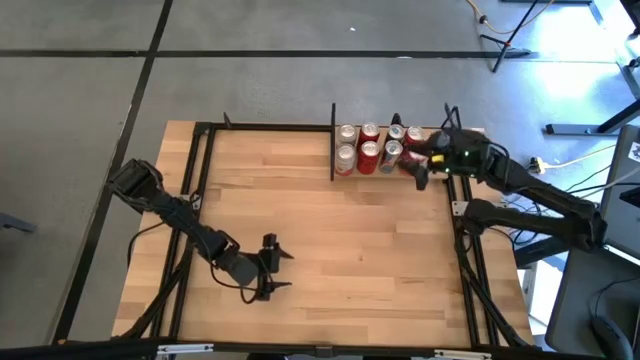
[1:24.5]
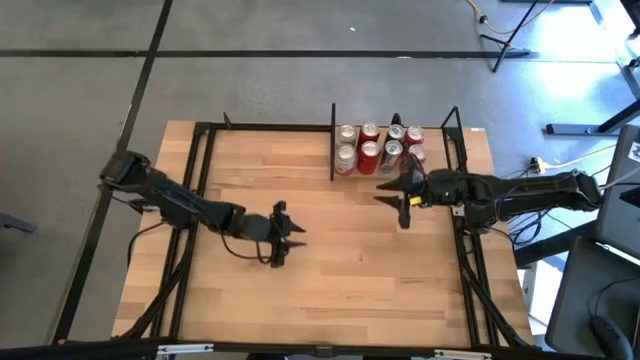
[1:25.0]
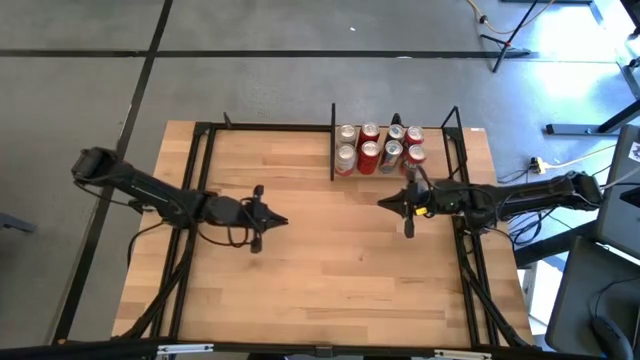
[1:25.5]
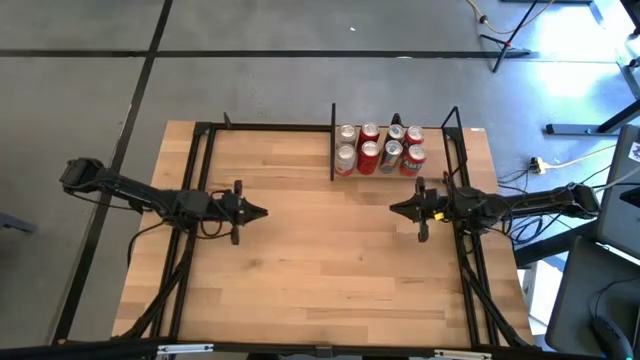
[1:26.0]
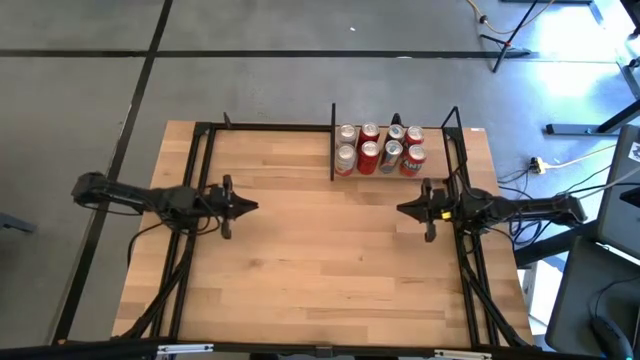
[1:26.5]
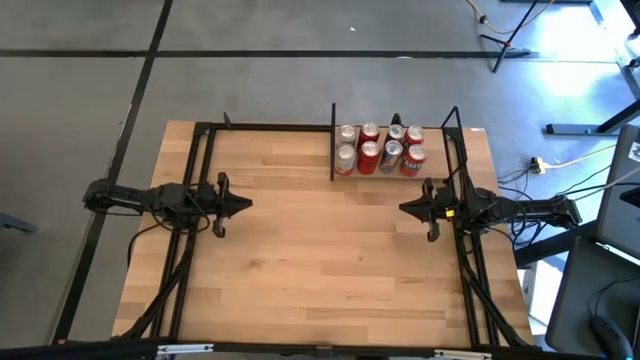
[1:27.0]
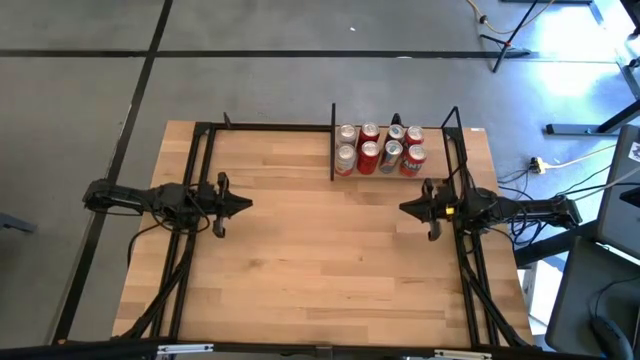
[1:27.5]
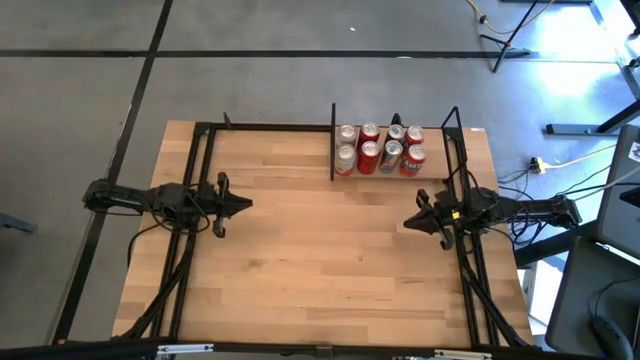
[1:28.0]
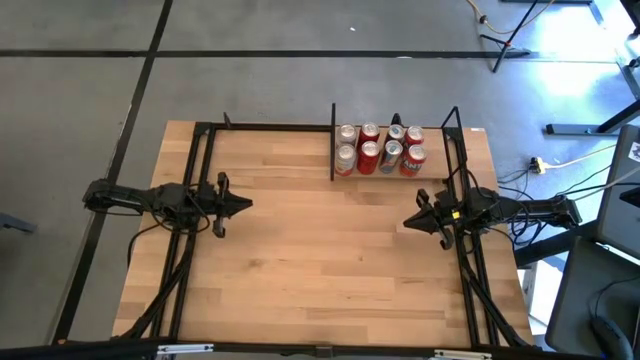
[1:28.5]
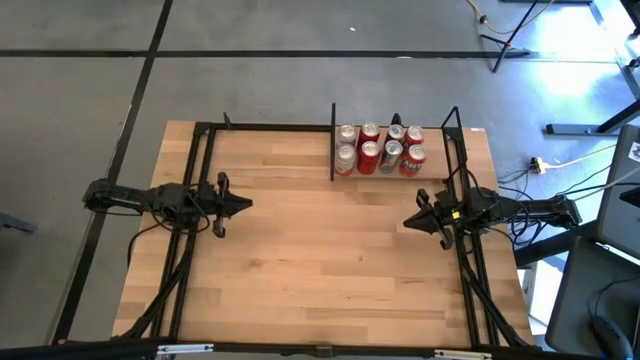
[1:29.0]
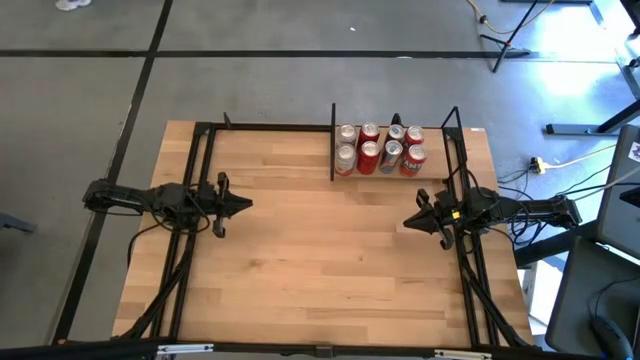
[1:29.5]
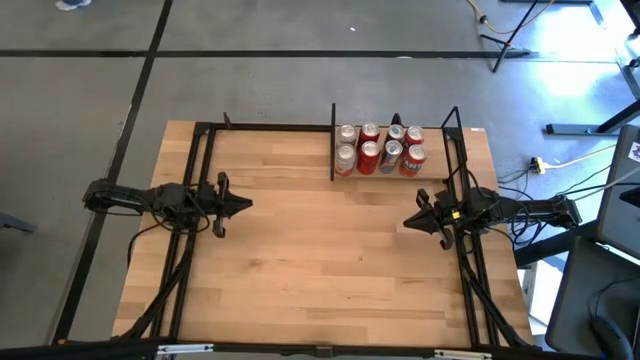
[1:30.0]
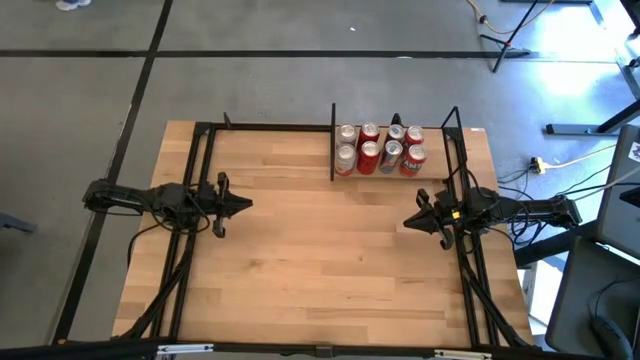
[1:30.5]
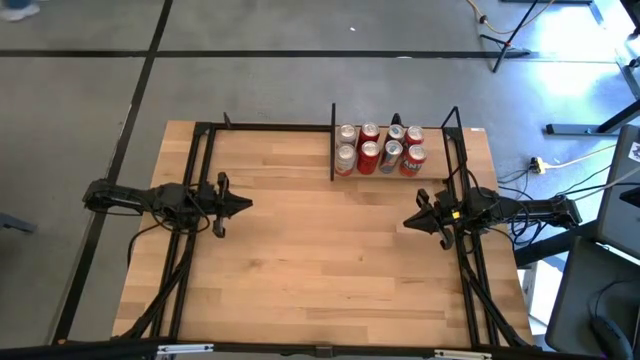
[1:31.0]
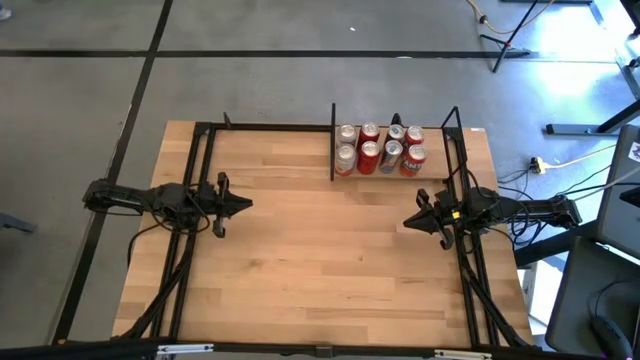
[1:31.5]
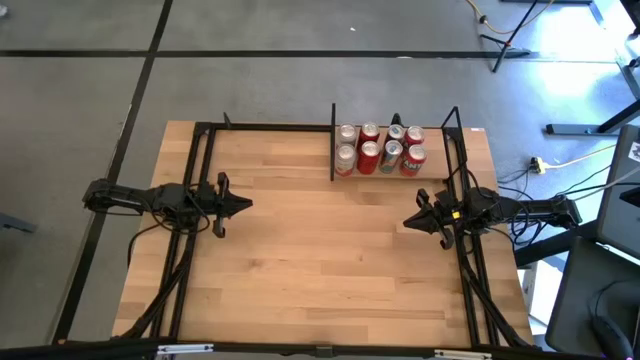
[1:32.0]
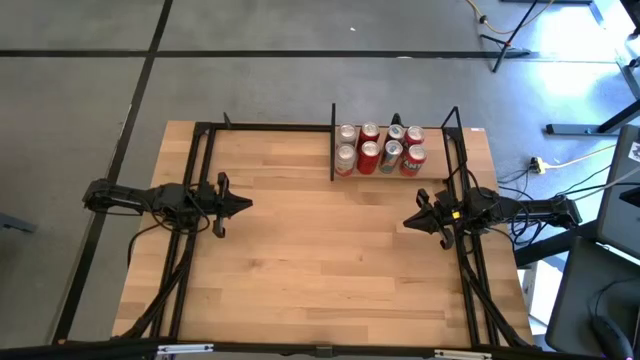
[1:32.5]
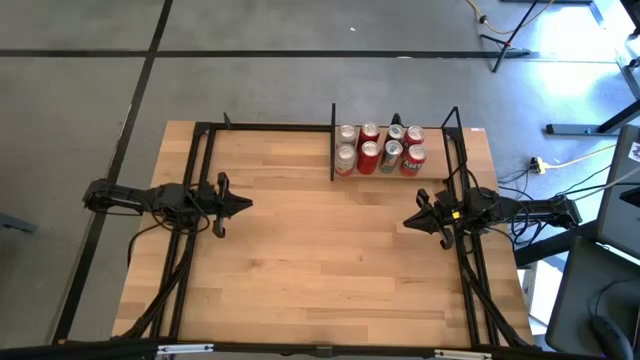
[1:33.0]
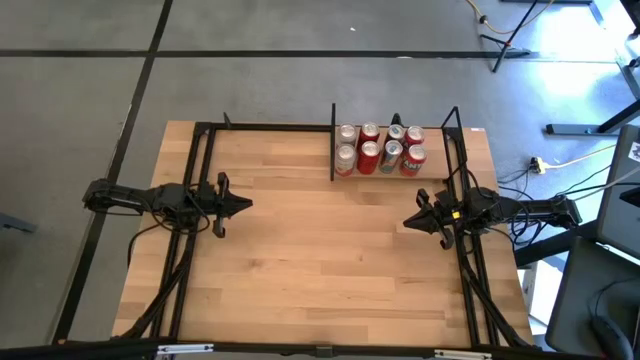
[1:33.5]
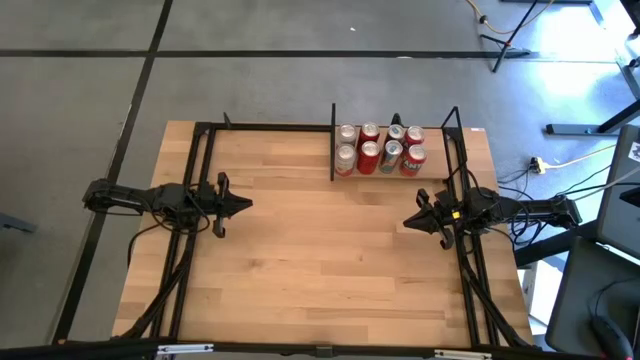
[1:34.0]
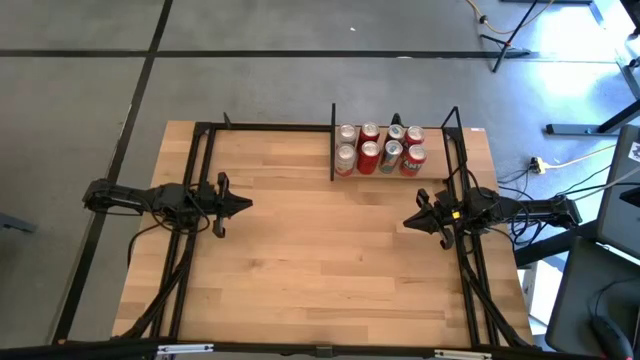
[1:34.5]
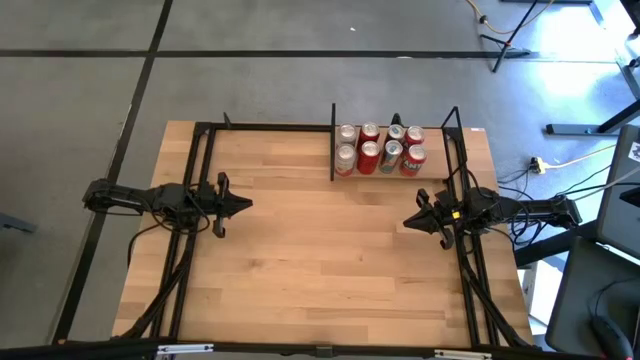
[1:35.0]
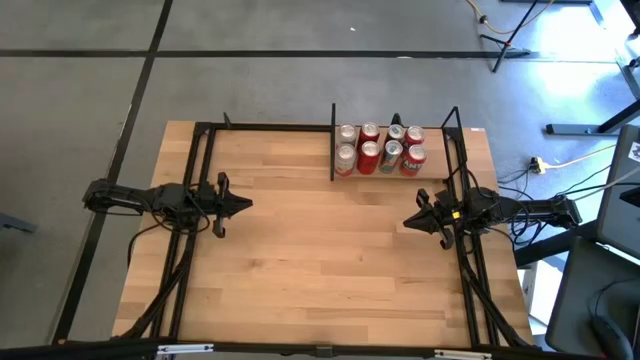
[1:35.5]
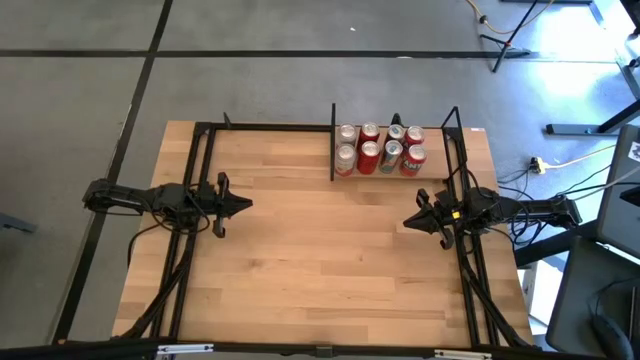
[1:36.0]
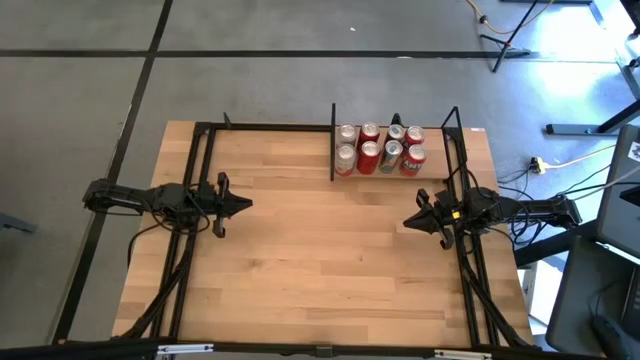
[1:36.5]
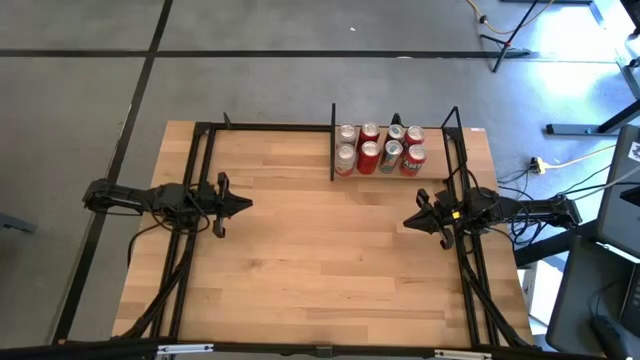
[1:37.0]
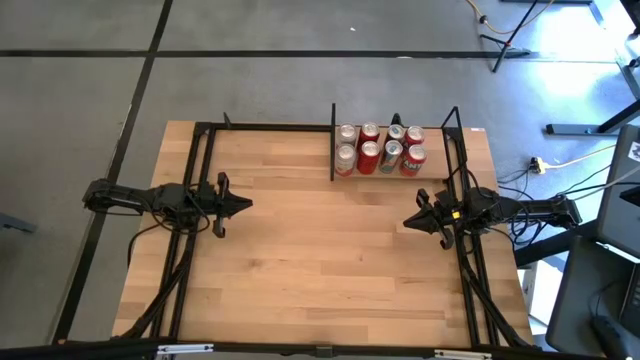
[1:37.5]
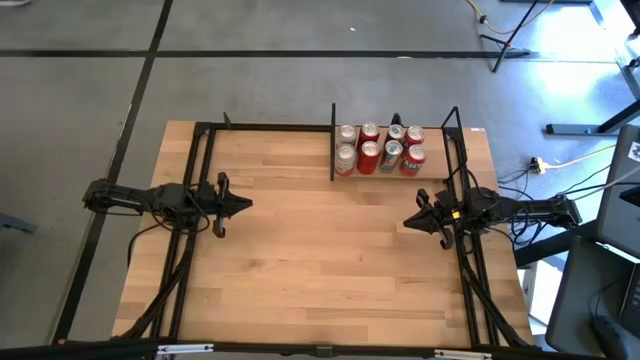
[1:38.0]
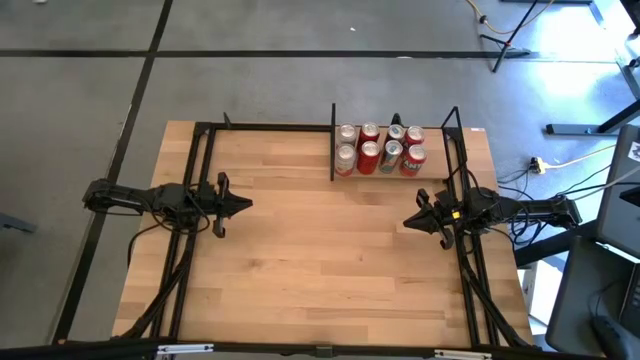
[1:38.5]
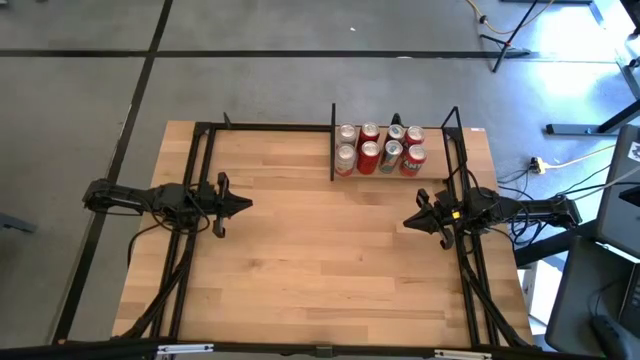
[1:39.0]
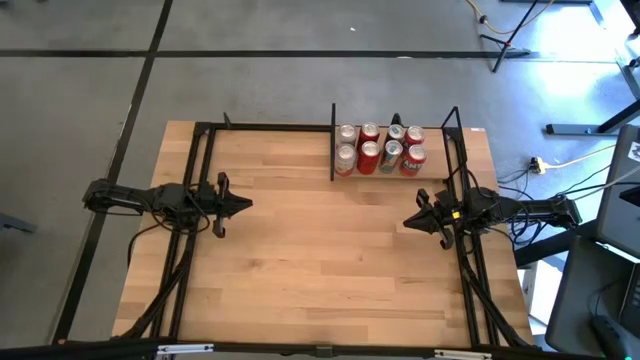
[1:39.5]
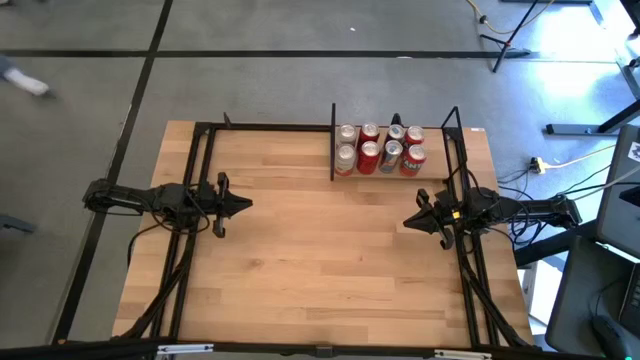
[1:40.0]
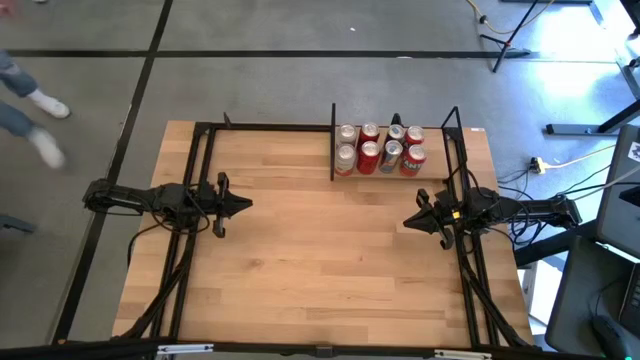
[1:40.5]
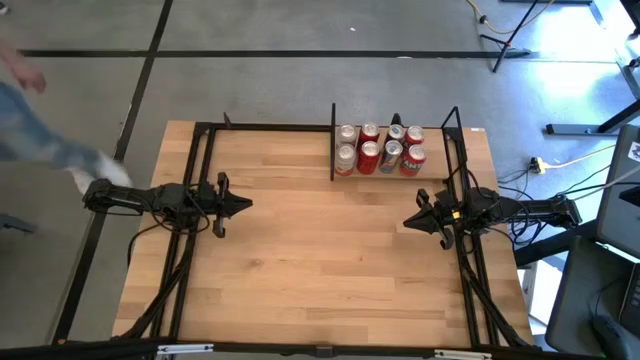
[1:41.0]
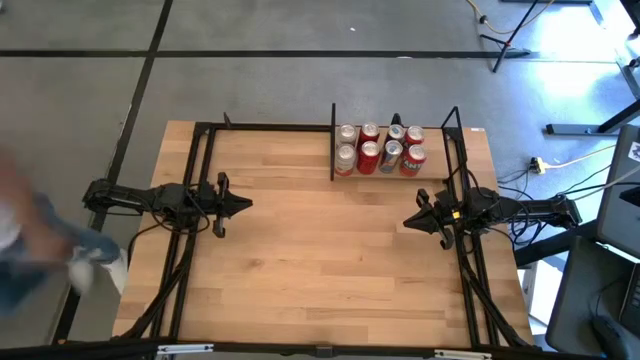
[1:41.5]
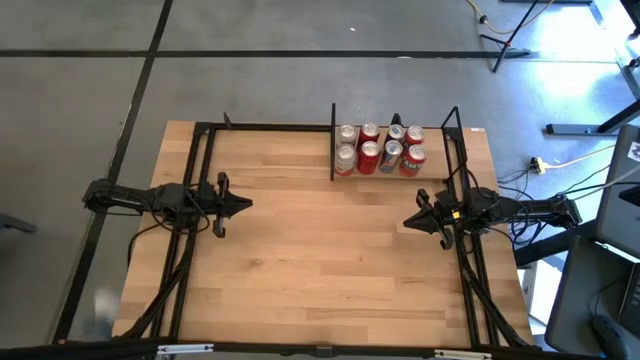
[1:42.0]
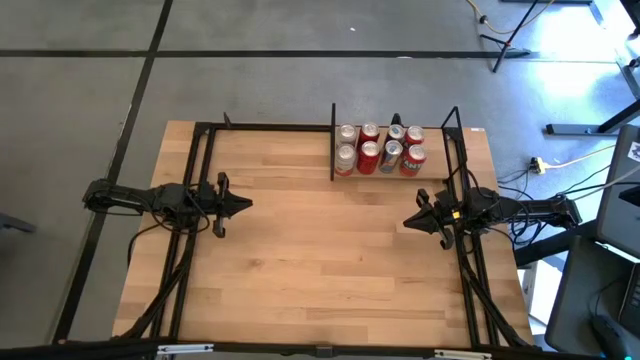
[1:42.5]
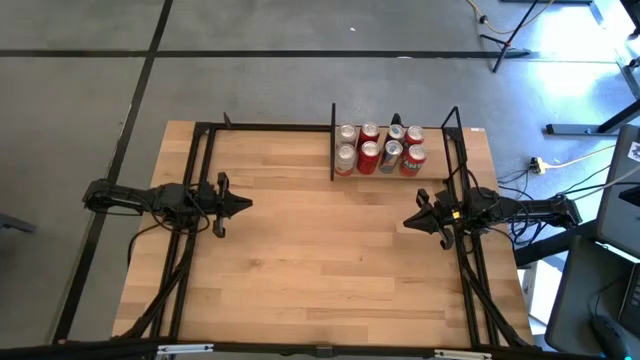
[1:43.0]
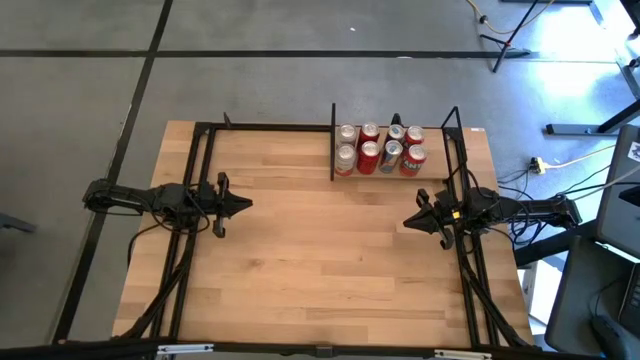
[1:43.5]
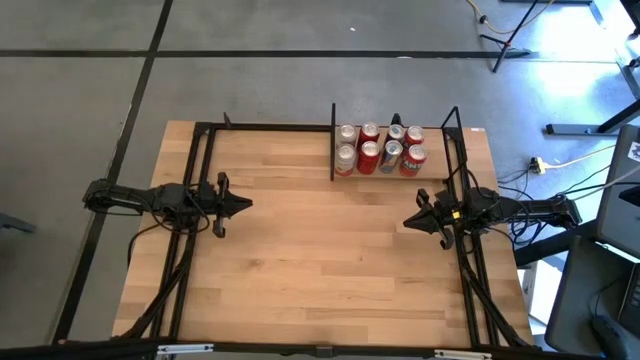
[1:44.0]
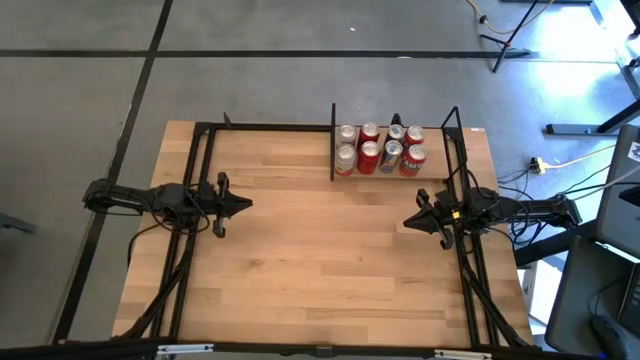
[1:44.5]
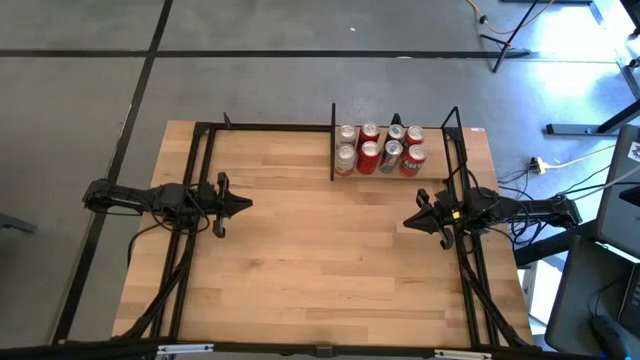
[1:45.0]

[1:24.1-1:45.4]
Task: Place canned beverage on shelf
Return to Home Position
